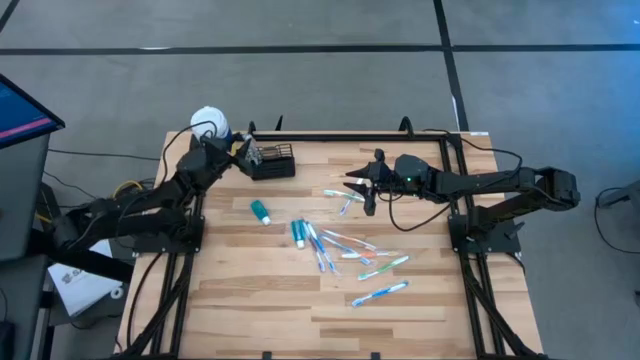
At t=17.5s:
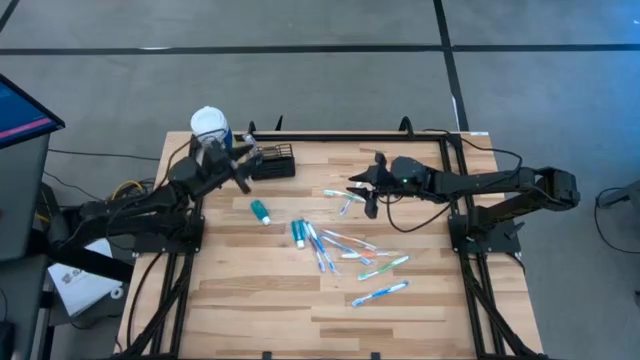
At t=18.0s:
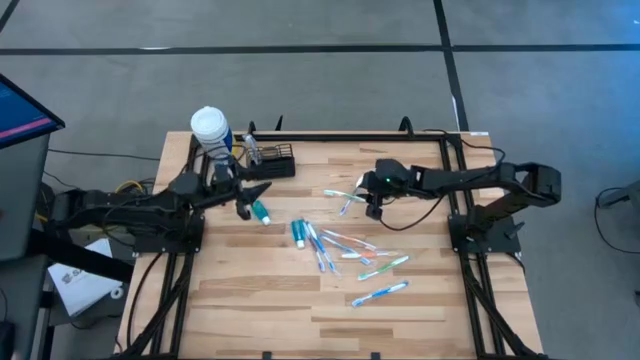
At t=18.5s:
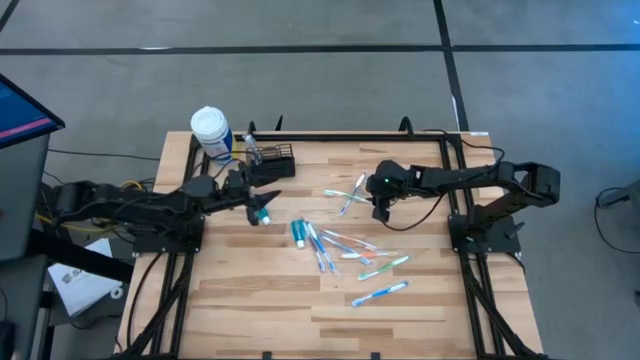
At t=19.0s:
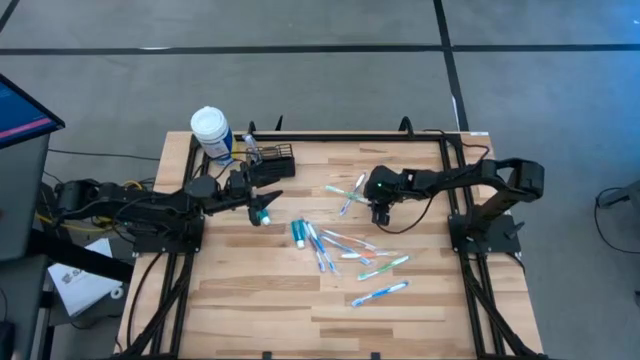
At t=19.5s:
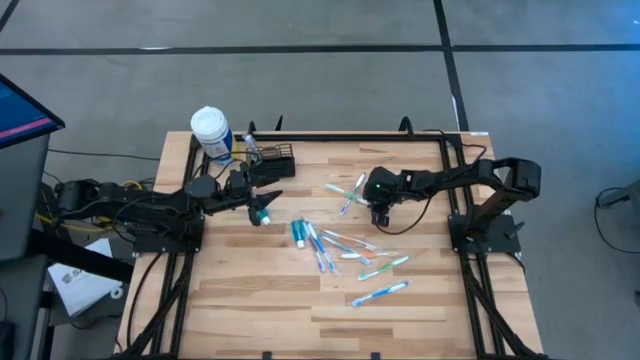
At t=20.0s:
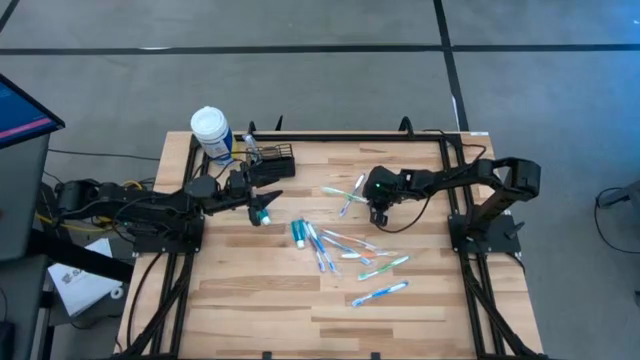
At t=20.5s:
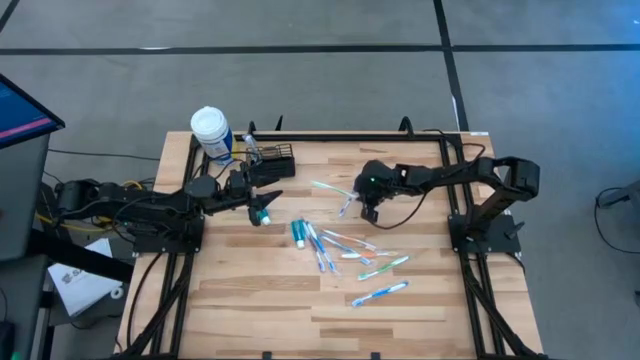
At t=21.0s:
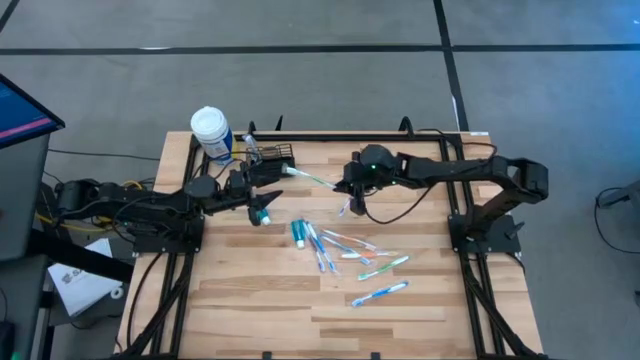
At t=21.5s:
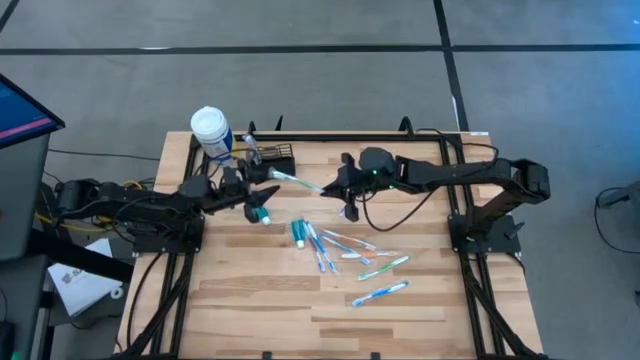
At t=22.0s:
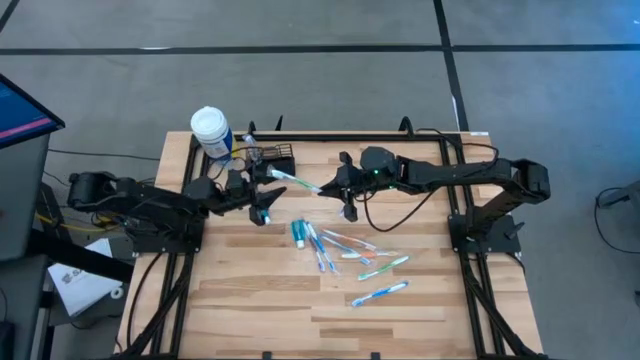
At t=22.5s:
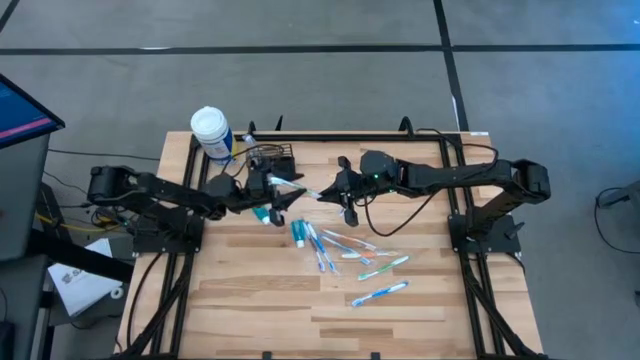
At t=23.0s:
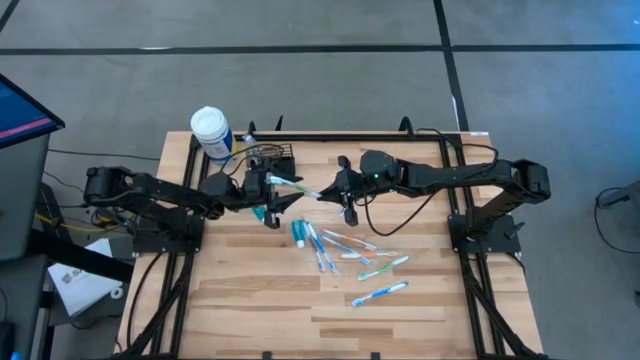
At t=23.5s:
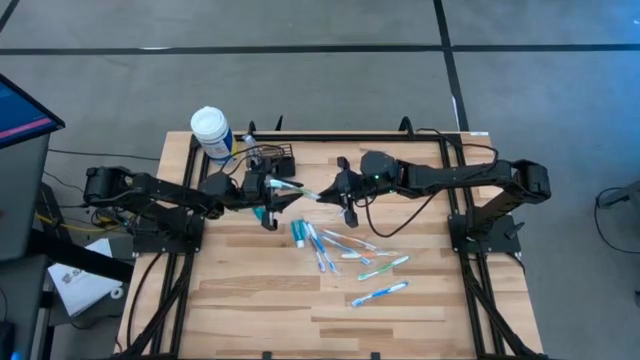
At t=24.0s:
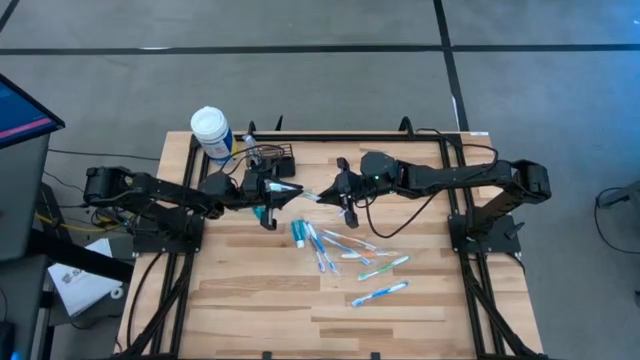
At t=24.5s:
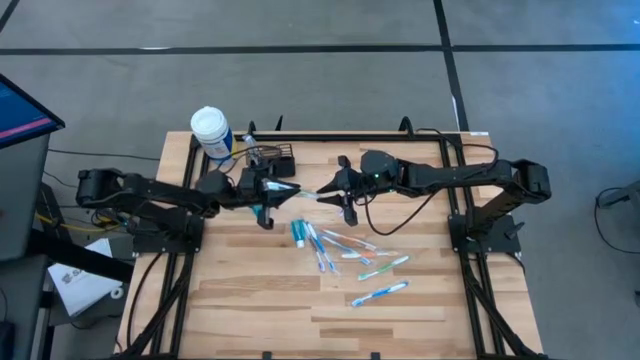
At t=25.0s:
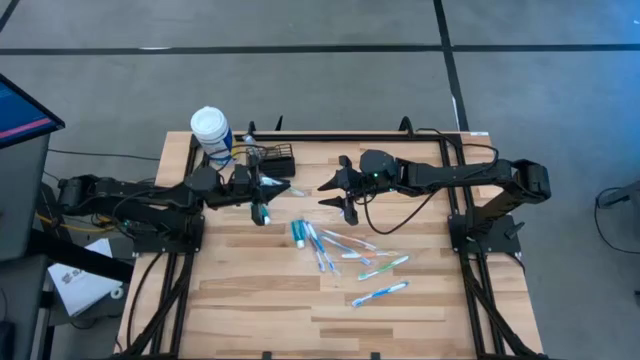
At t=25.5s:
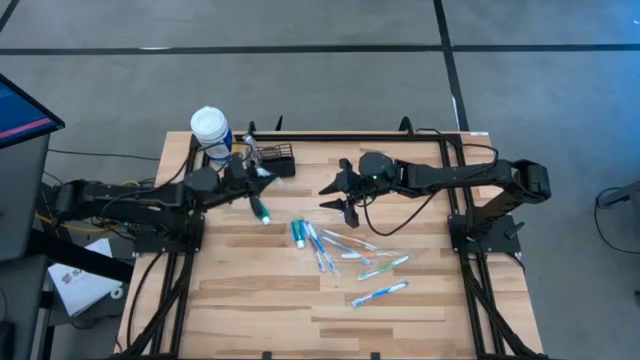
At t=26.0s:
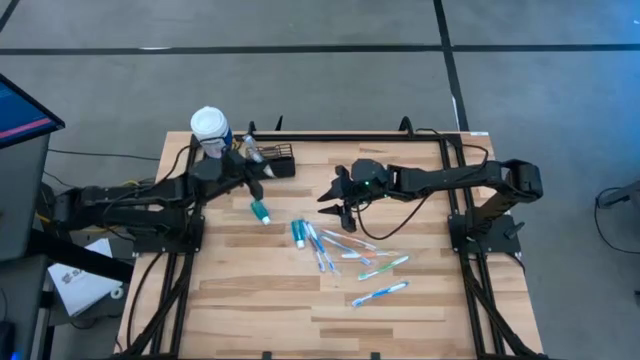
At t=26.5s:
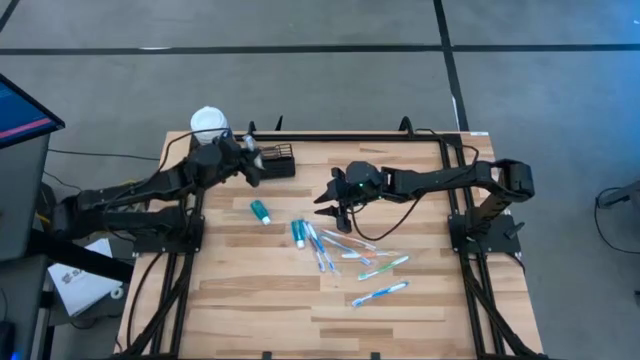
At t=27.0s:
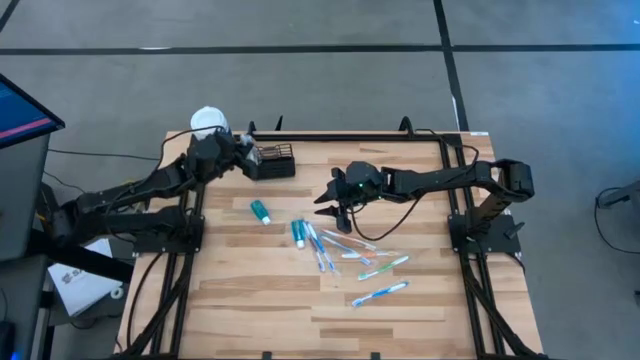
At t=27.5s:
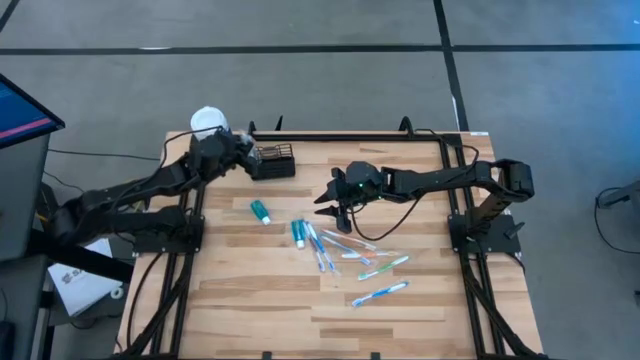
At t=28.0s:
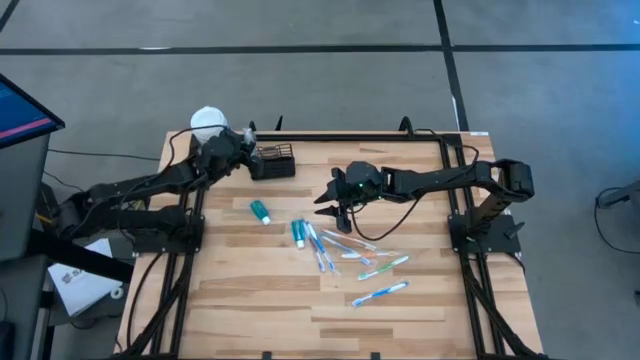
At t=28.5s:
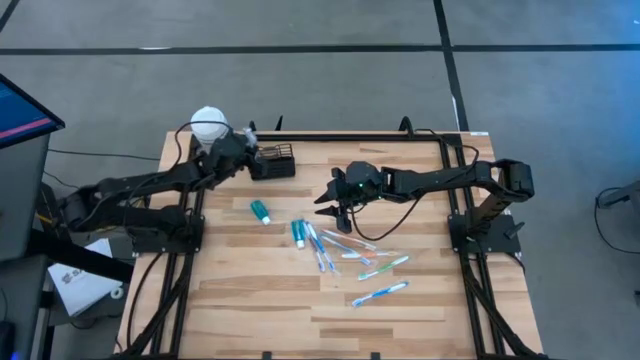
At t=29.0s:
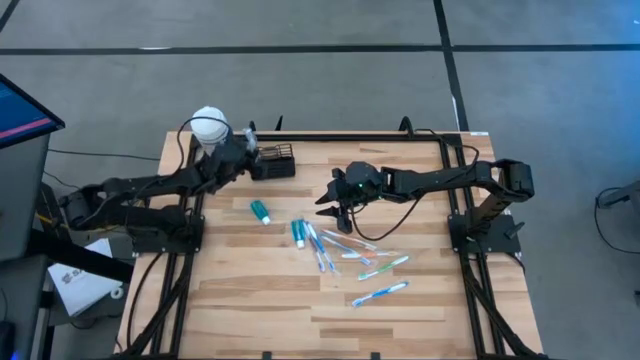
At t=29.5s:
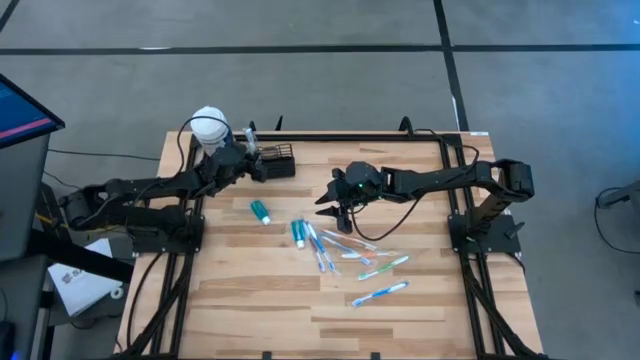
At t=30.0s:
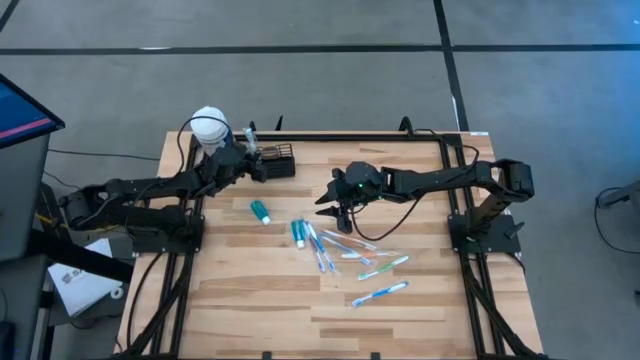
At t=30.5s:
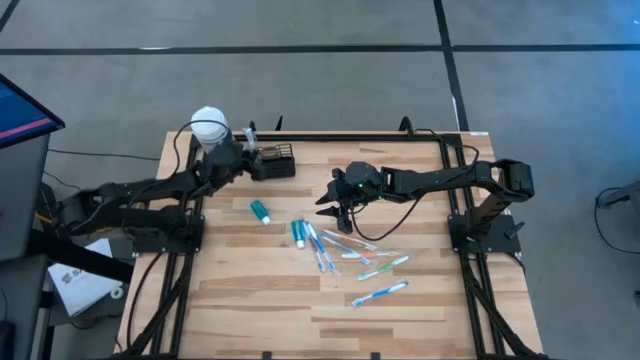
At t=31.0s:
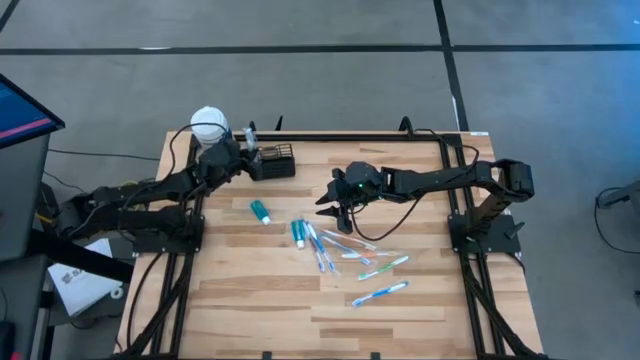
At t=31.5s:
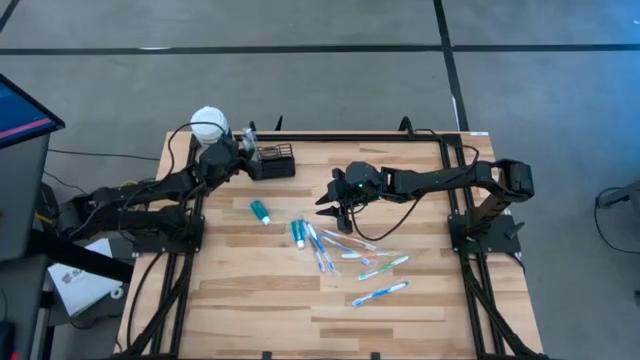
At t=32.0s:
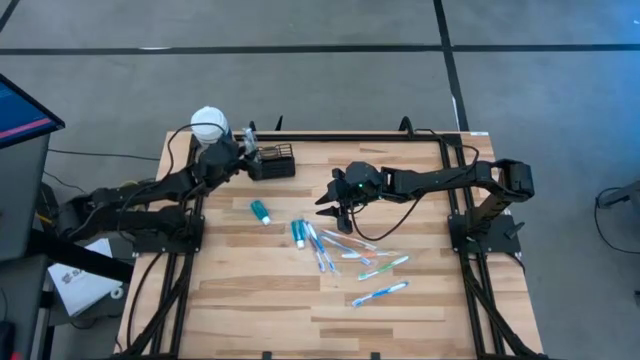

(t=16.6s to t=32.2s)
Task: Pick & Place toothbrushing station
Put the top green toothbrush into the black wire organizer

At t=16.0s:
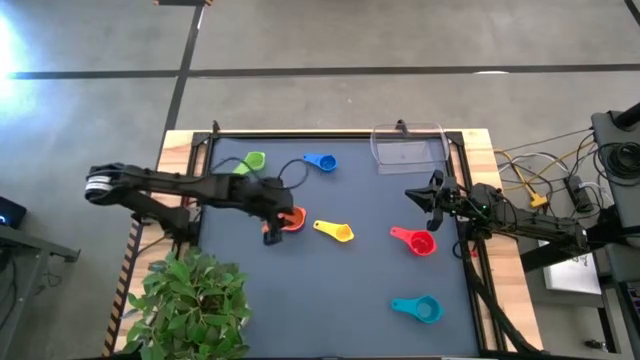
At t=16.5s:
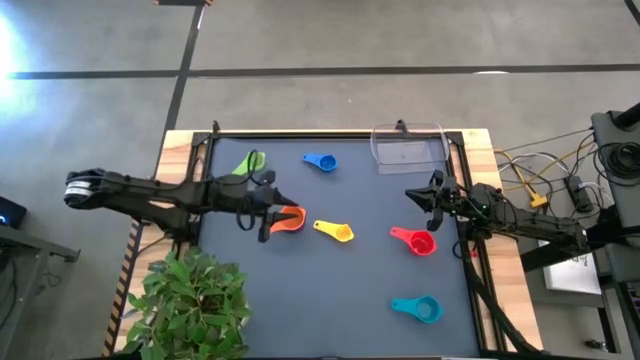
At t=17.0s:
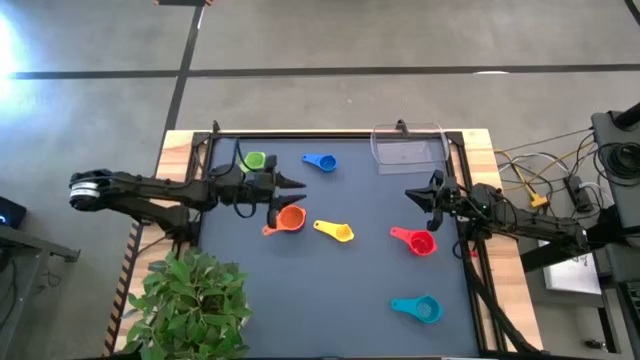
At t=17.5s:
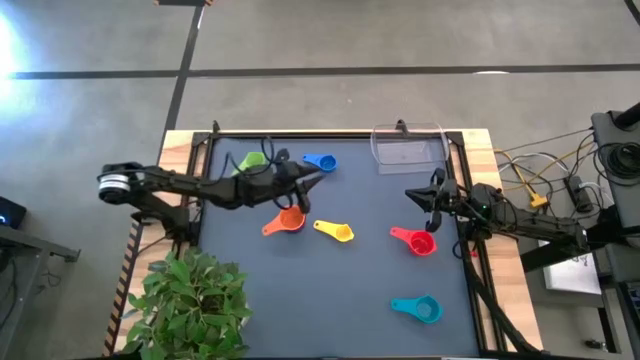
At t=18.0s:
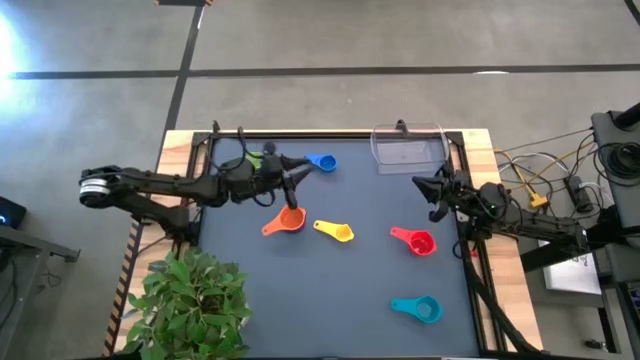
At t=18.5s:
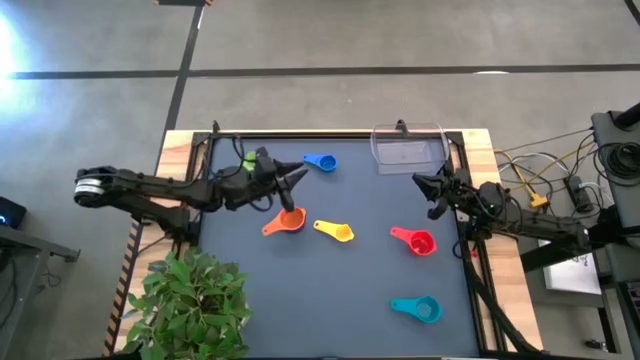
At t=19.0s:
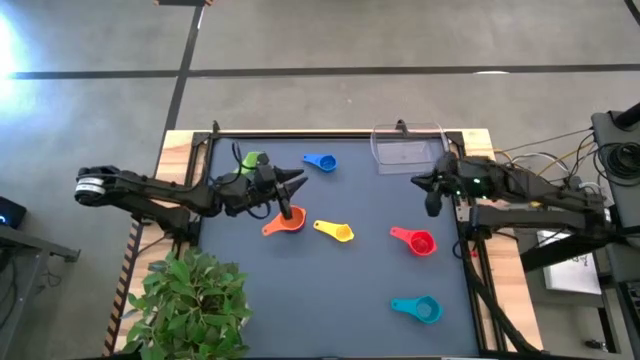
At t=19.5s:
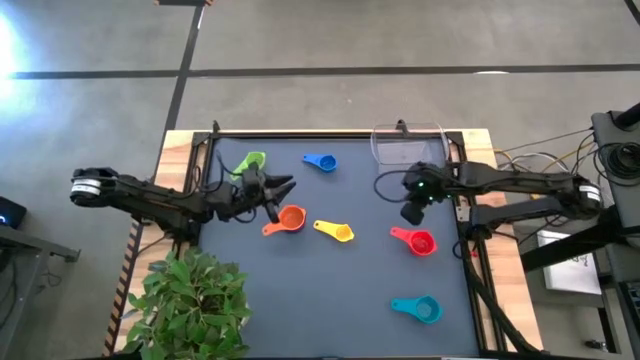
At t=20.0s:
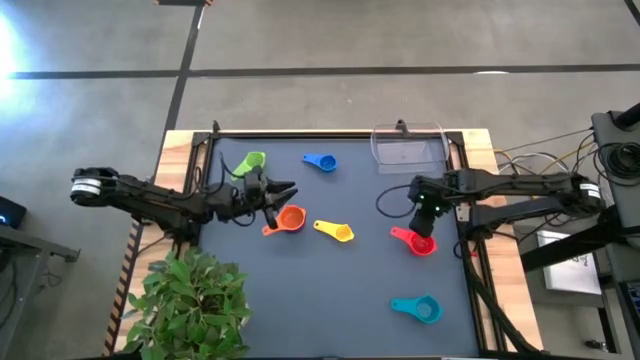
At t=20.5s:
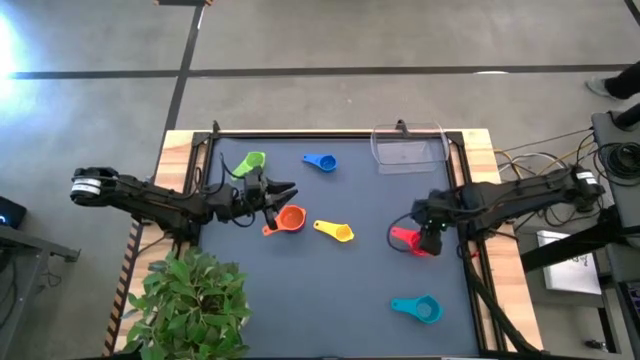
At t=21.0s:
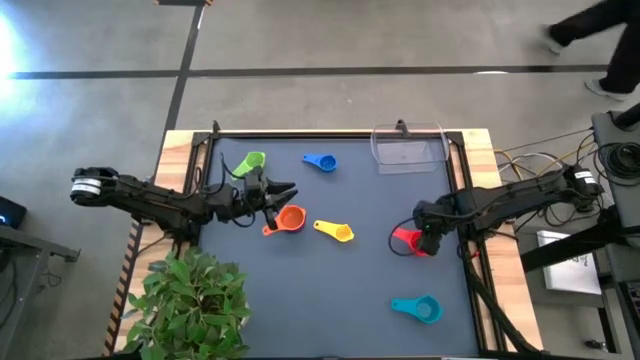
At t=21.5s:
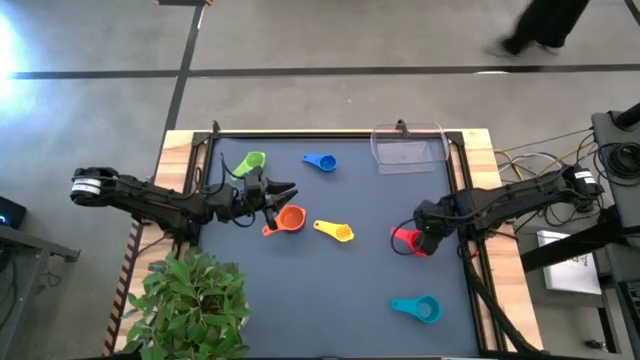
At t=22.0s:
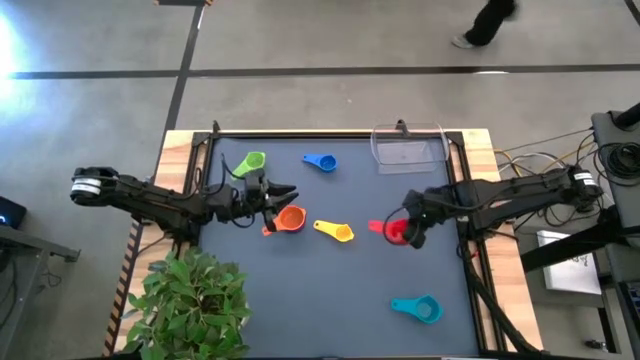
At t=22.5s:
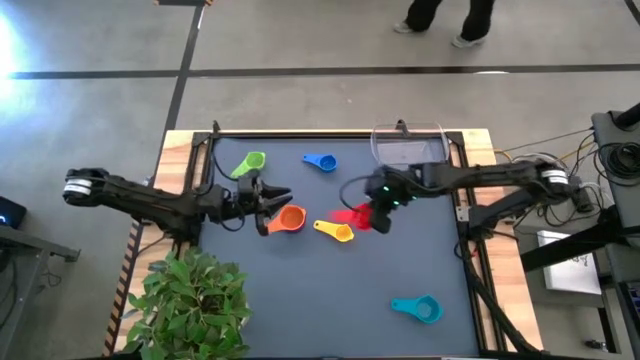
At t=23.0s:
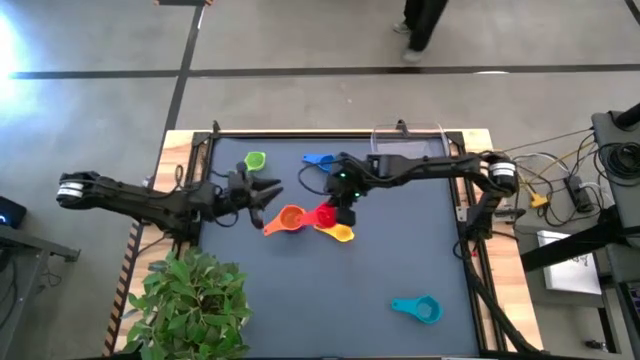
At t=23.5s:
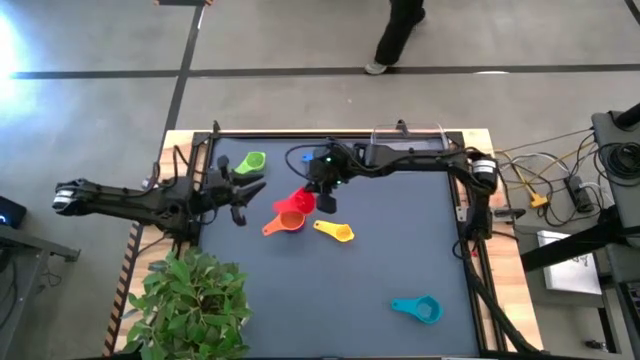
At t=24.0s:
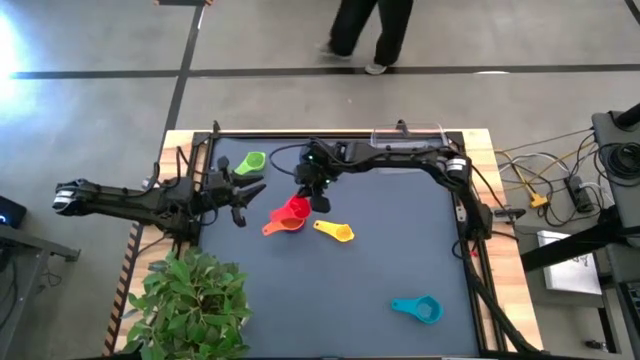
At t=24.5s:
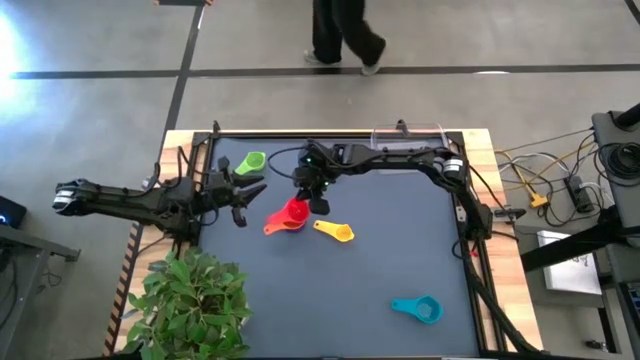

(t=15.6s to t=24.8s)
Task: Nest measuring cups in basket
Stack the red measuring cup on top of the orange measuring cup
